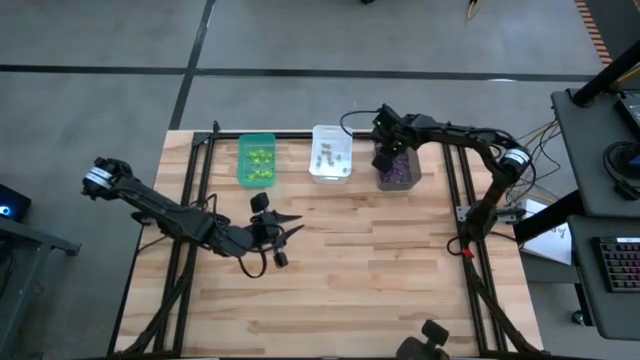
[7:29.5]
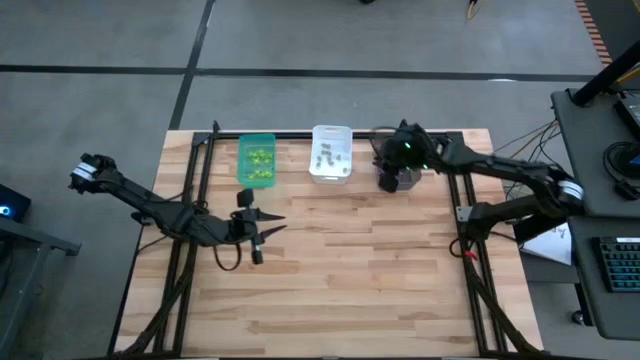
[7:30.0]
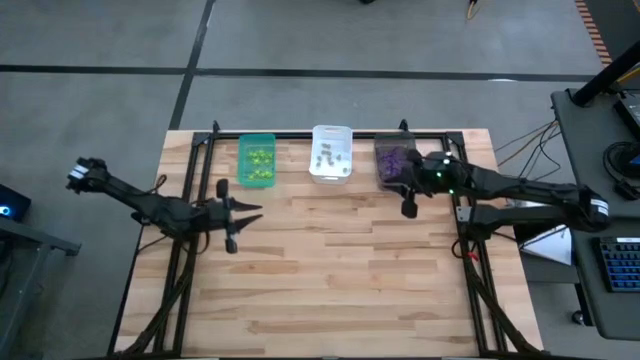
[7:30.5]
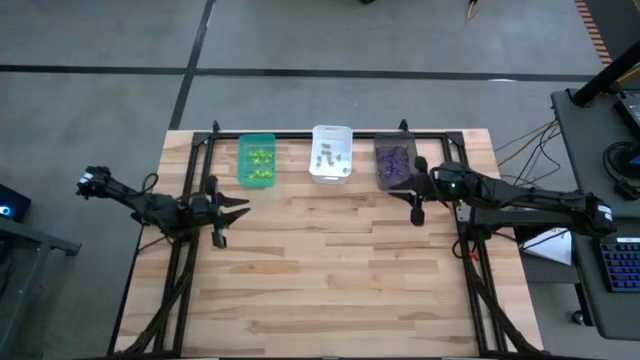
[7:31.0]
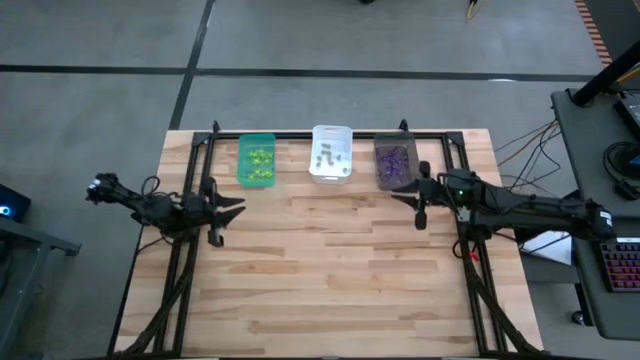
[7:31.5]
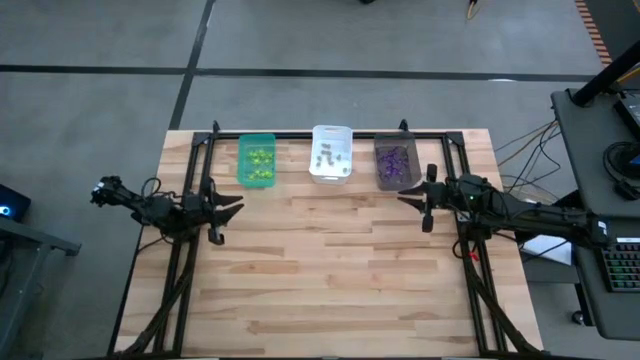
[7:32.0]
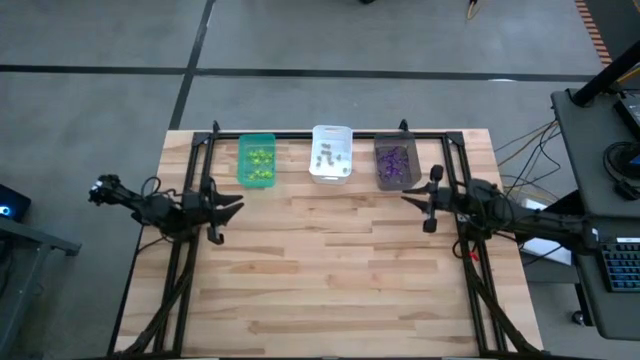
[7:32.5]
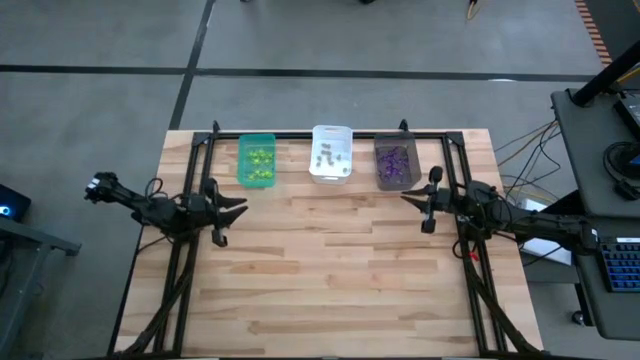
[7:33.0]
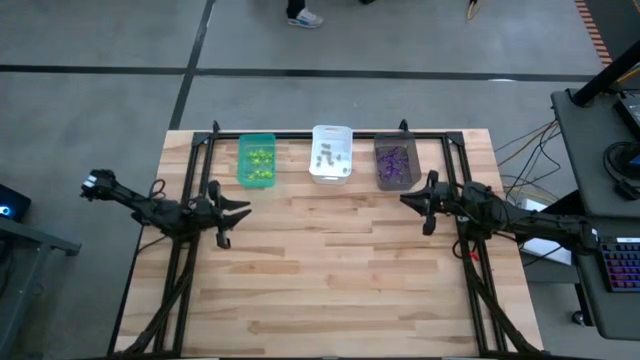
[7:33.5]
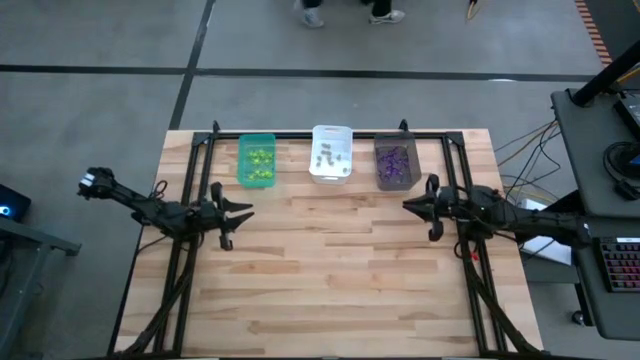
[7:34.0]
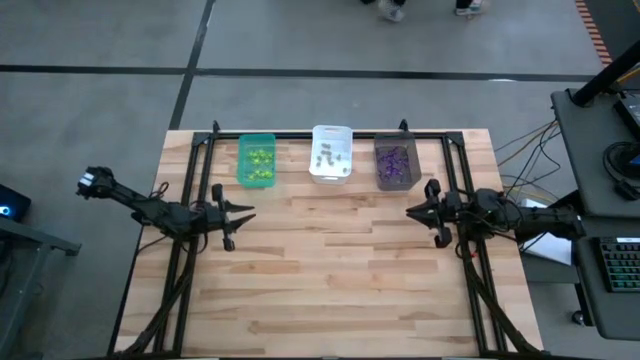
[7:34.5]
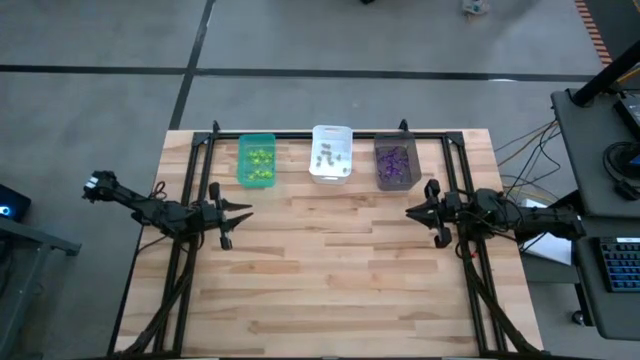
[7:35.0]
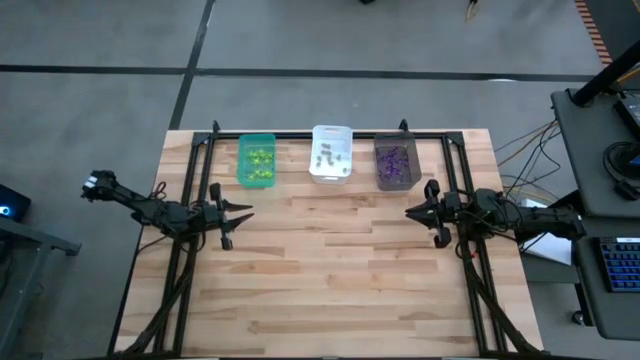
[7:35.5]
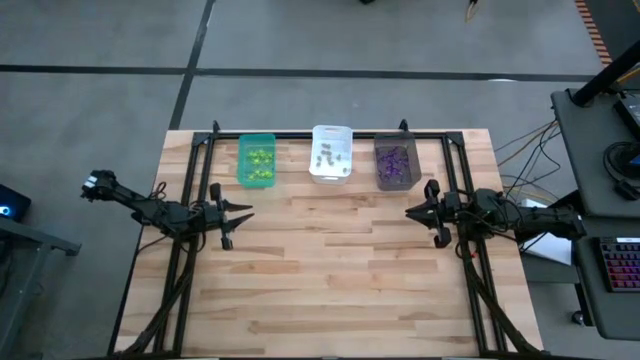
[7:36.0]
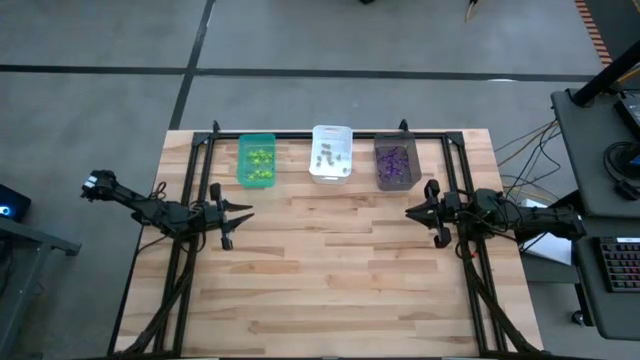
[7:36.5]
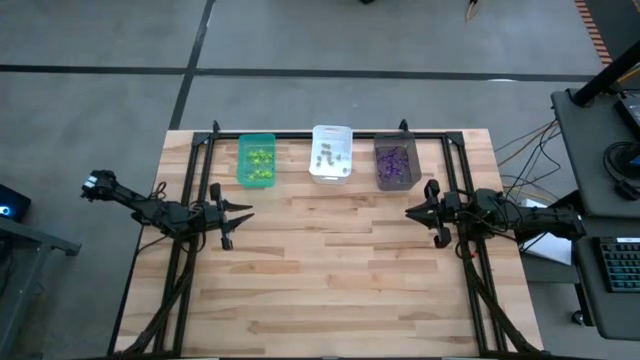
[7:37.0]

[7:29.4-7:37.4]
Task: Sort Halloween decoration
Return to Home Position

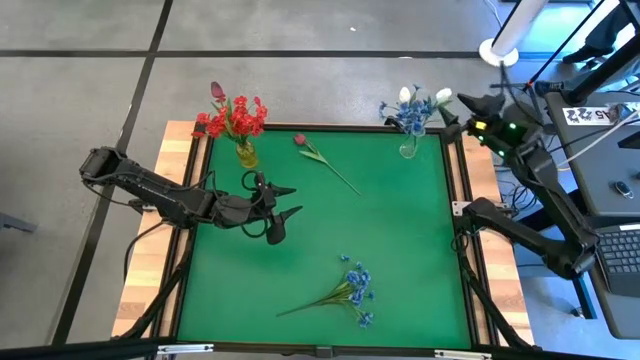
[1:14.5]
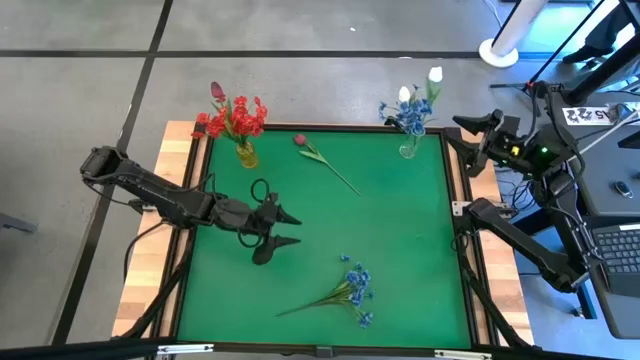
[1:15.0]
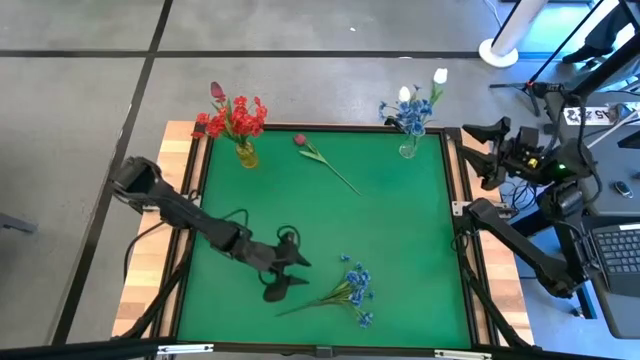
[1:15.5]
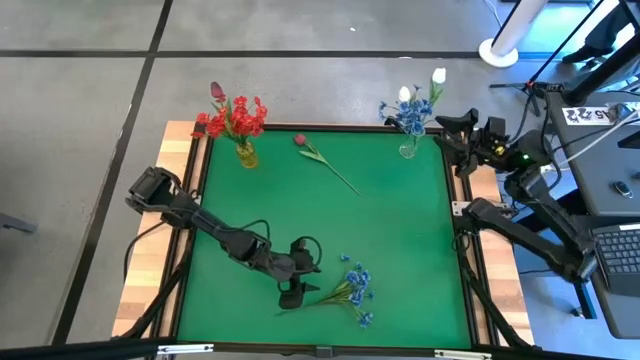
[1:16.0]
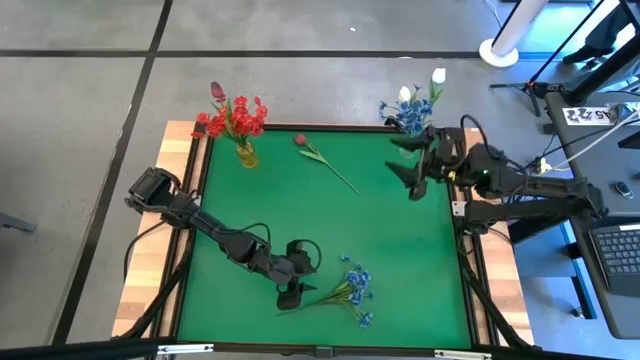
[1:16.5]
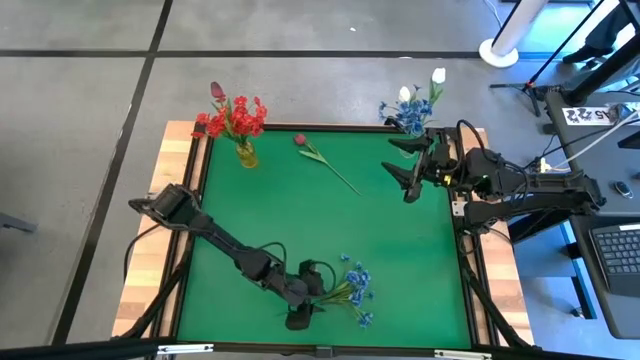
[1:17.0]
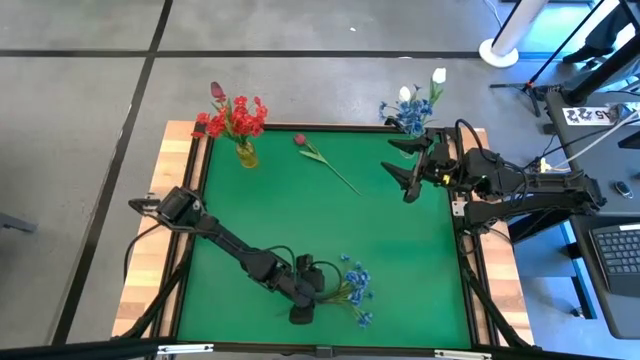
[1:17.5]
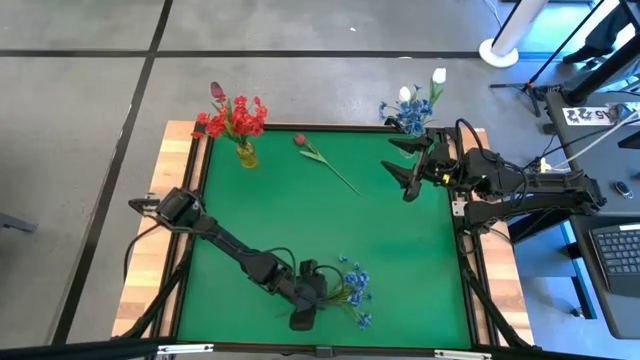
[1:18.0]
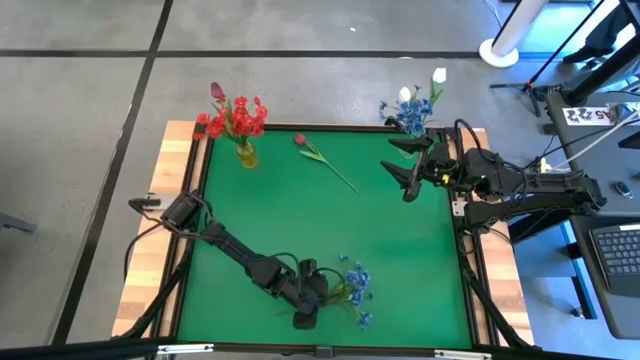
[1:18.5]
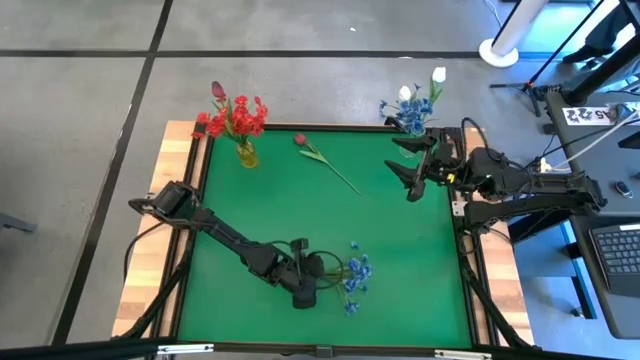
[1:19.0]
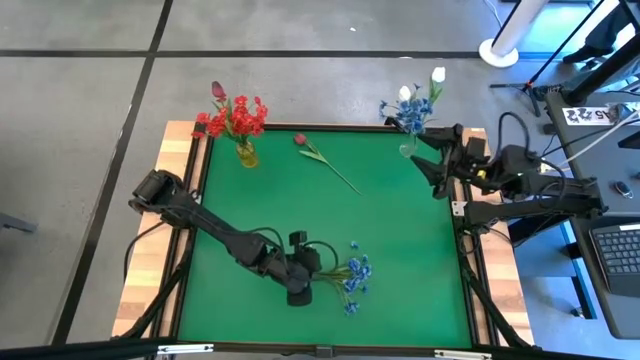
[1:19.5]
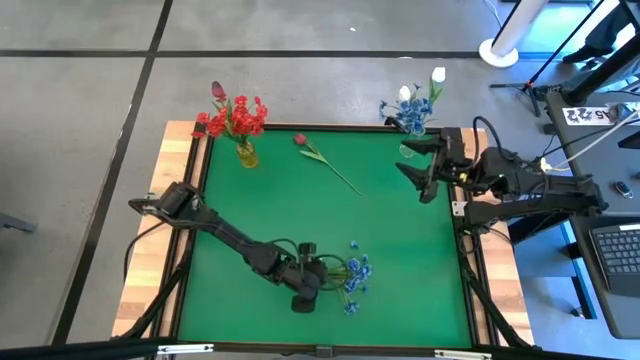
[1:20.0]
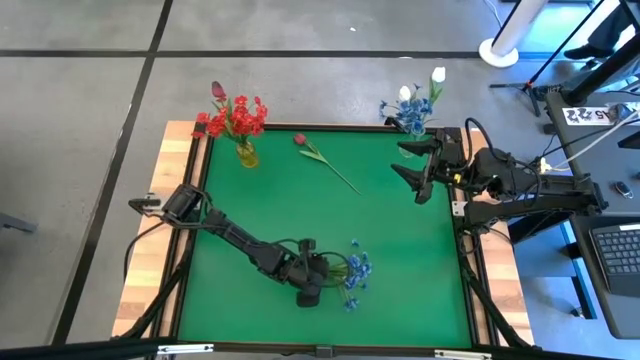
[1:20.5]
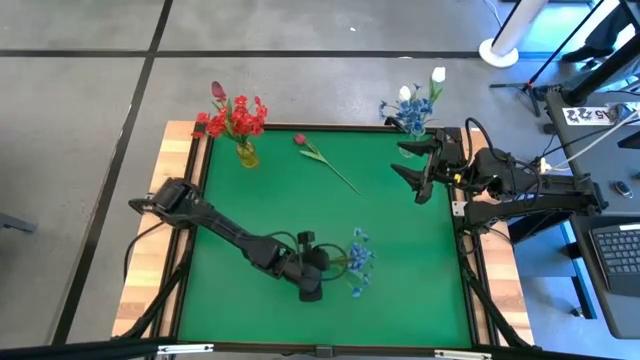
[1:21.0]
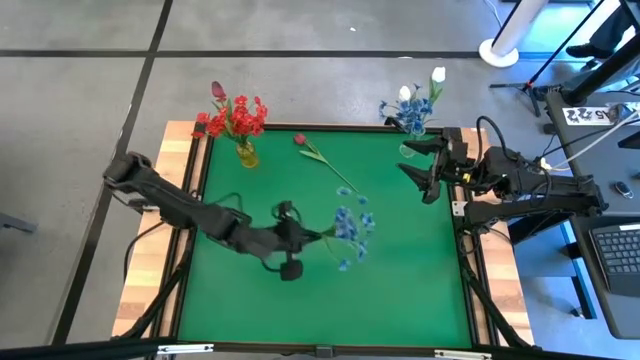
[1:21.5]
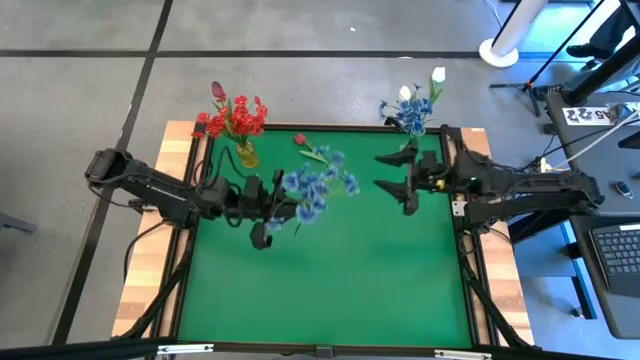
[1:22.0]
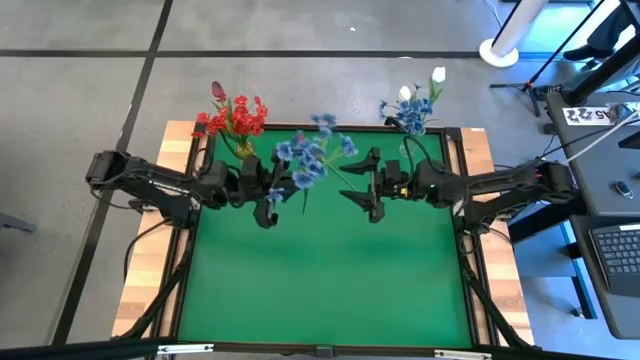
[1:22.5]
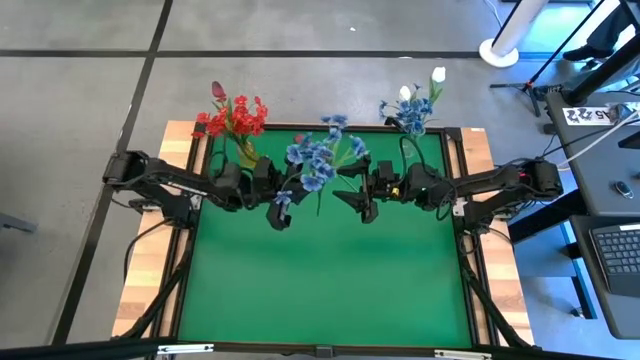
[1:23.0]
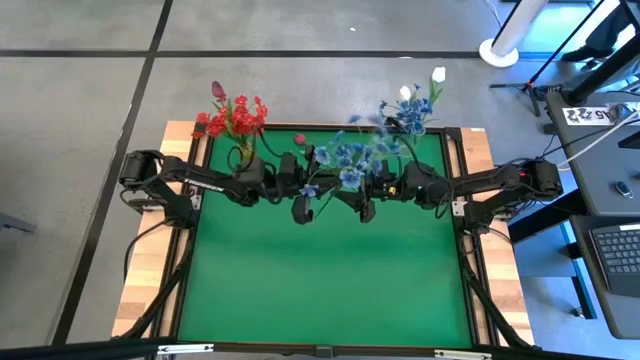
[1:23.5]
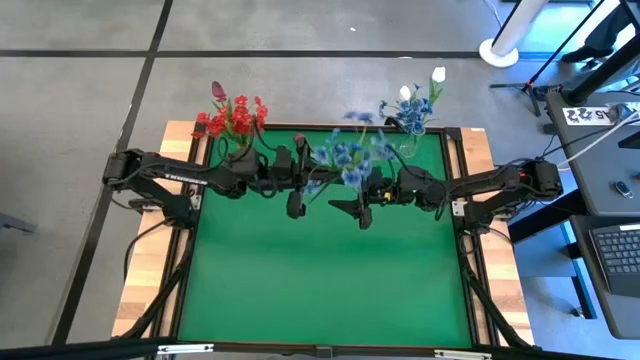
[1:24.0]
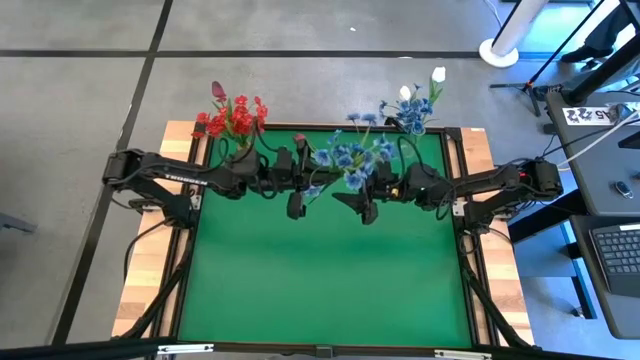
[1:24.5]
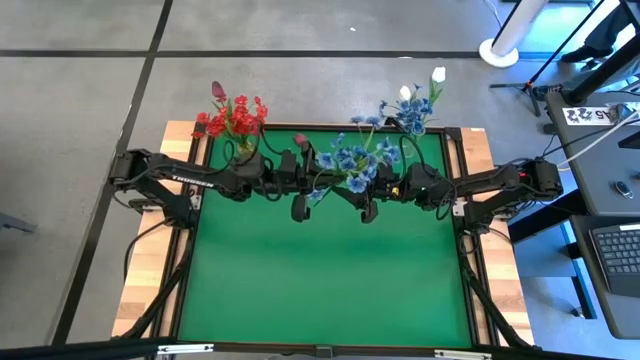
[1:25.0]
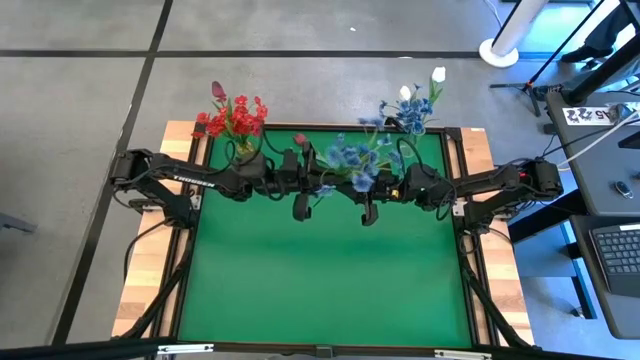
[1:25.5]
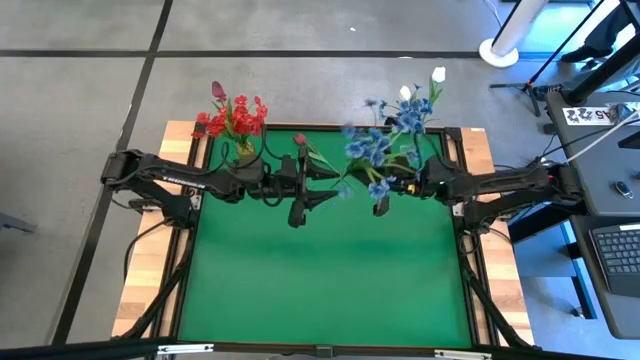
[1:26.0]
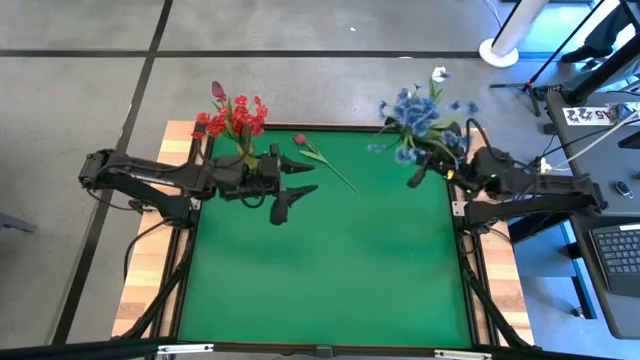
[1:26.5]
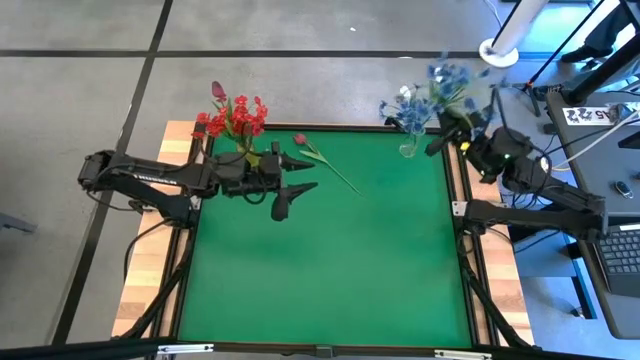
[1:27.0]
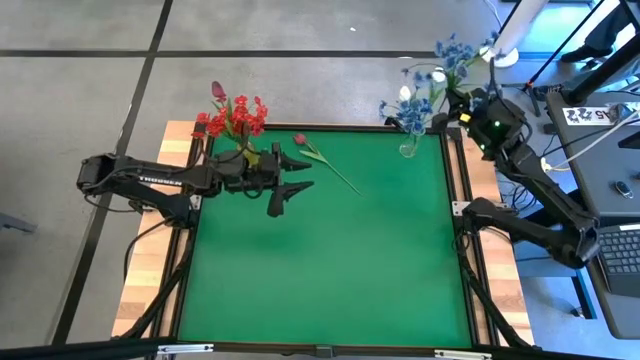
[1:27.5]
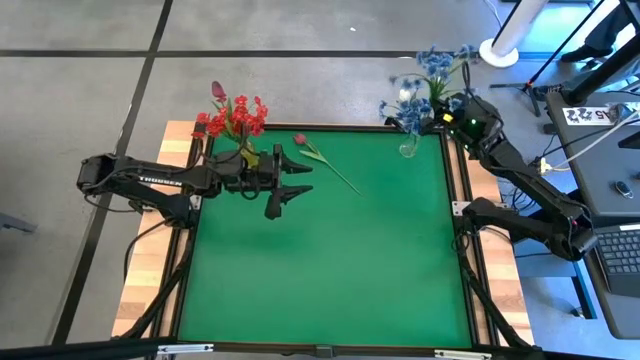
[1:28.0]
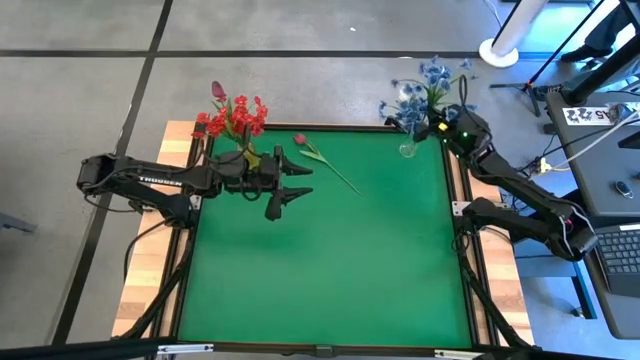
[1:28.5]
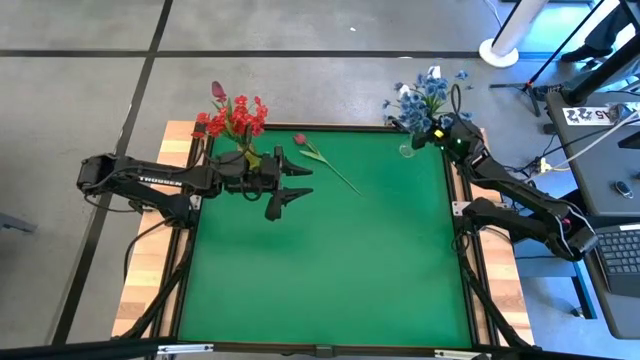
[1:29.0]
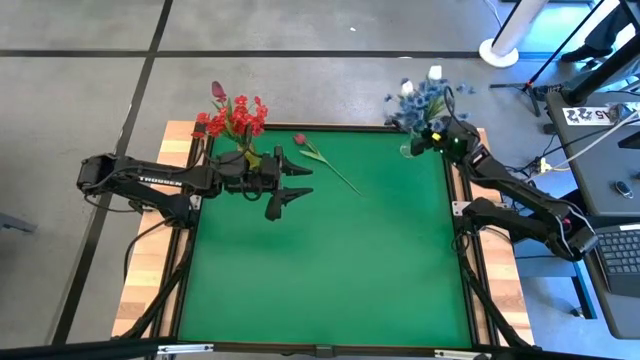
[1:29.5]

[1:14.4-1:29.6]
Task: Sort flowers into vase by color
Put the blue flower into the transparent vase
